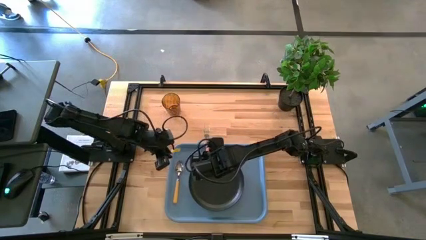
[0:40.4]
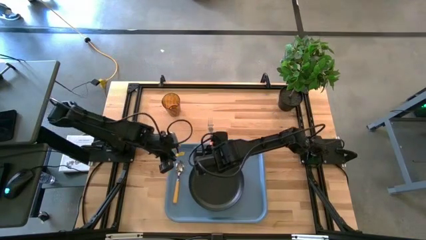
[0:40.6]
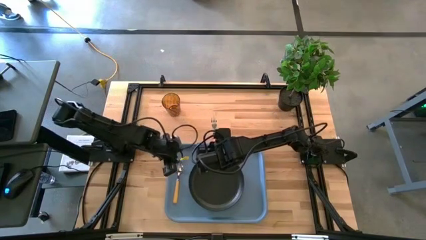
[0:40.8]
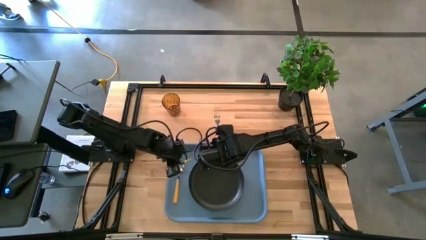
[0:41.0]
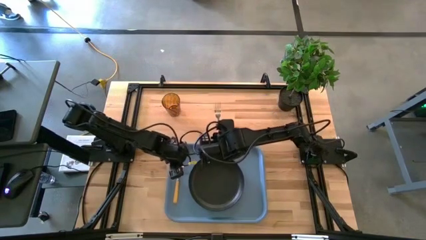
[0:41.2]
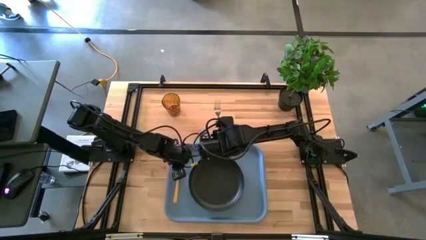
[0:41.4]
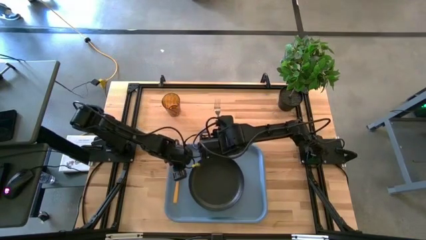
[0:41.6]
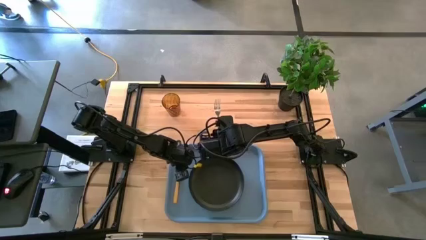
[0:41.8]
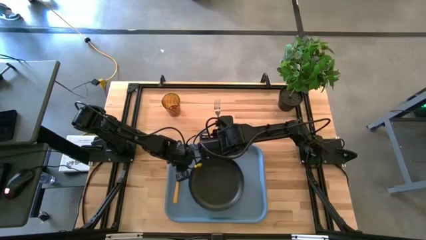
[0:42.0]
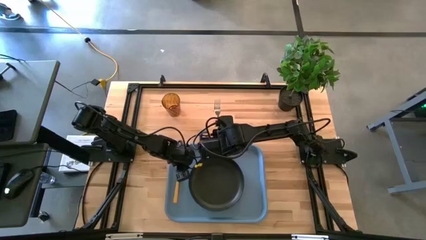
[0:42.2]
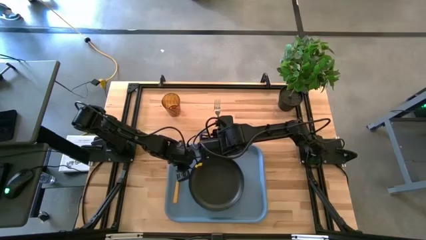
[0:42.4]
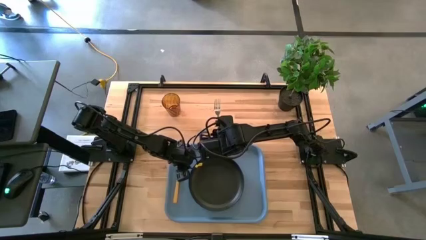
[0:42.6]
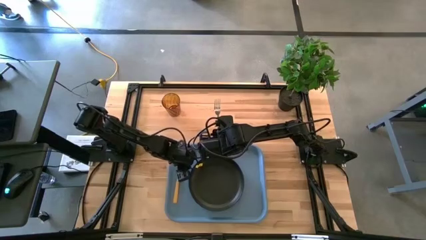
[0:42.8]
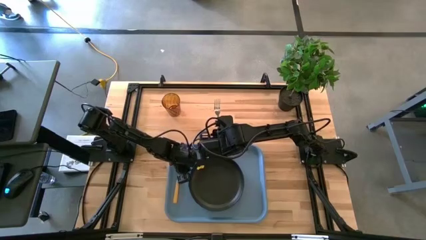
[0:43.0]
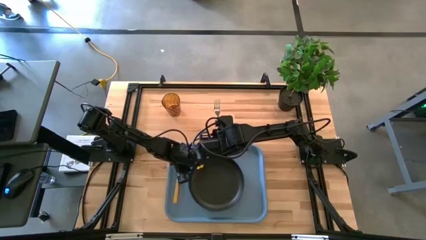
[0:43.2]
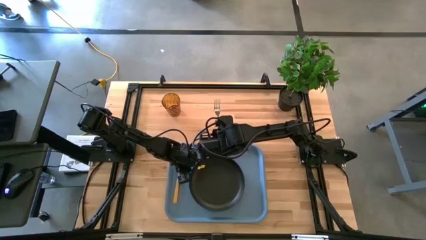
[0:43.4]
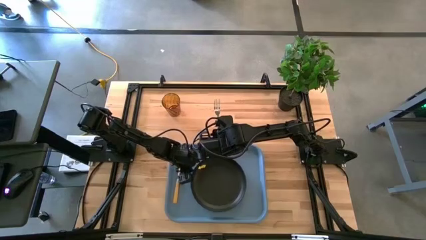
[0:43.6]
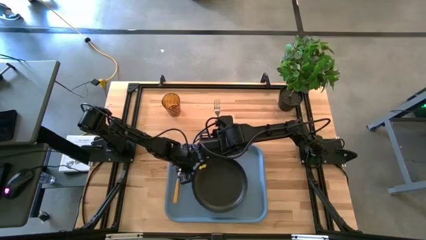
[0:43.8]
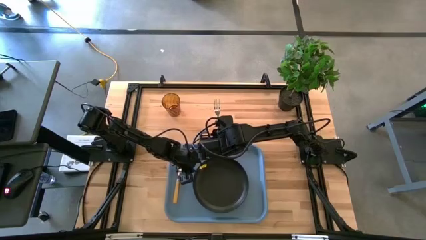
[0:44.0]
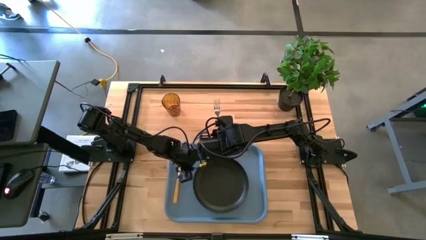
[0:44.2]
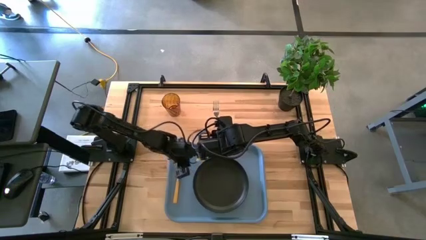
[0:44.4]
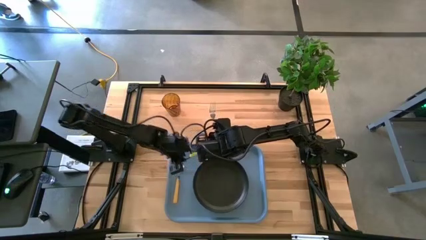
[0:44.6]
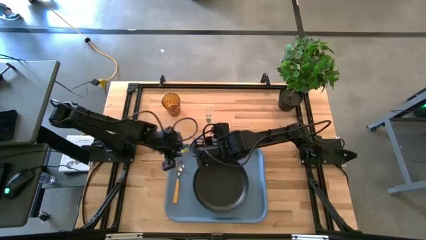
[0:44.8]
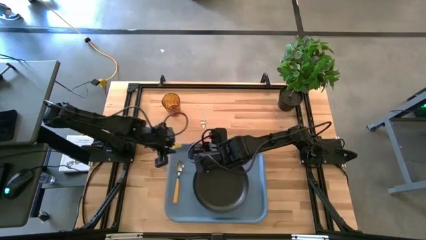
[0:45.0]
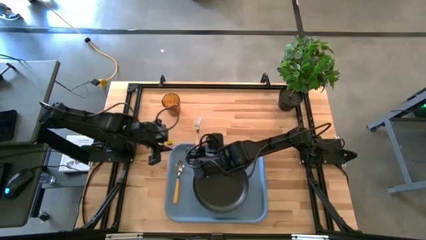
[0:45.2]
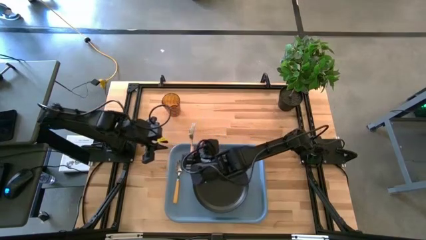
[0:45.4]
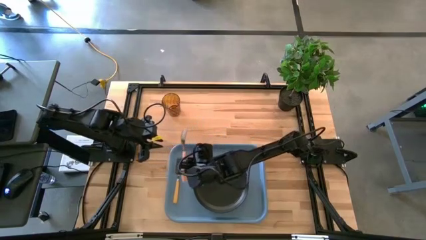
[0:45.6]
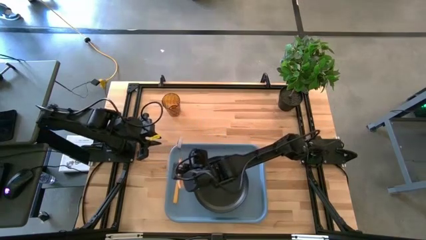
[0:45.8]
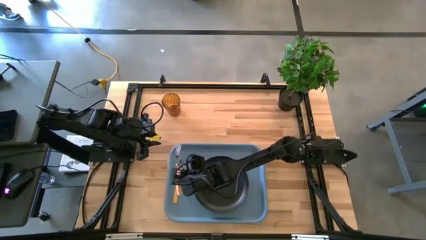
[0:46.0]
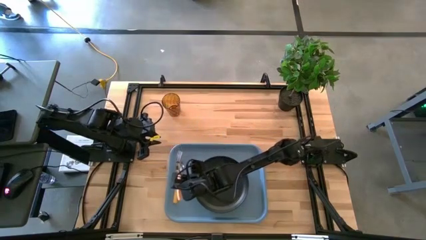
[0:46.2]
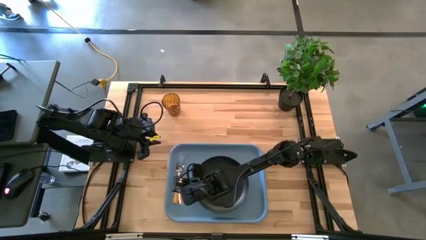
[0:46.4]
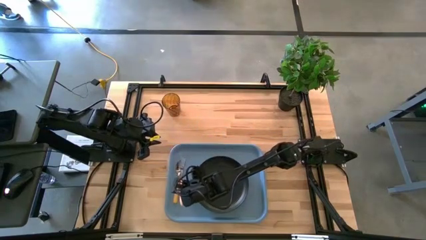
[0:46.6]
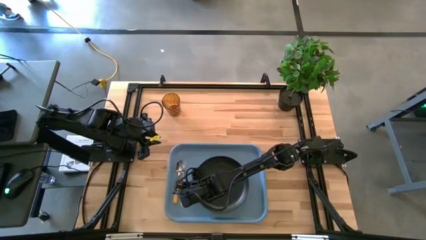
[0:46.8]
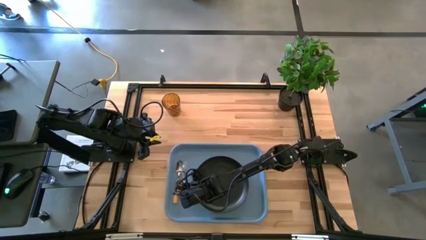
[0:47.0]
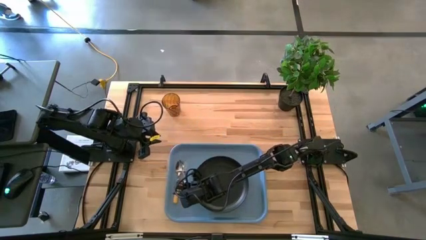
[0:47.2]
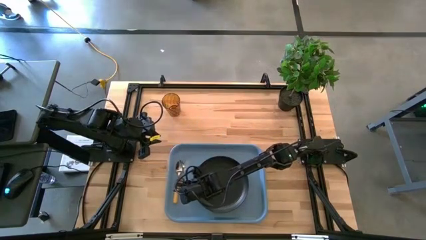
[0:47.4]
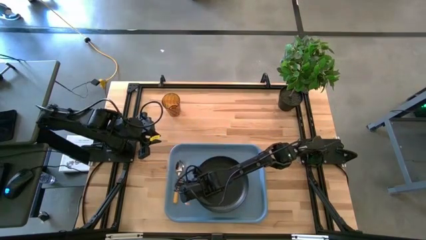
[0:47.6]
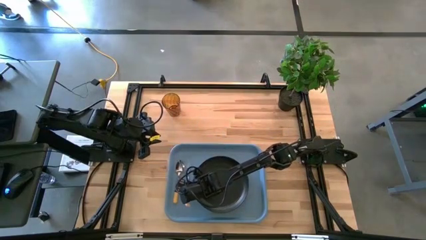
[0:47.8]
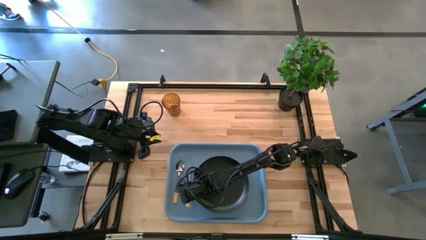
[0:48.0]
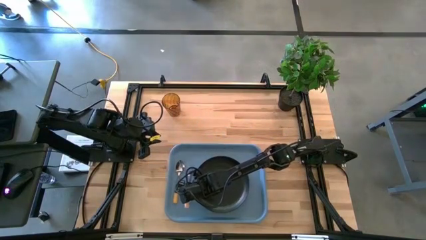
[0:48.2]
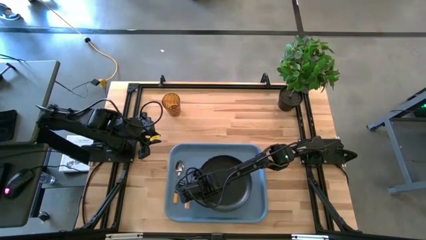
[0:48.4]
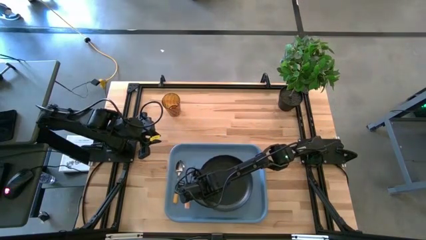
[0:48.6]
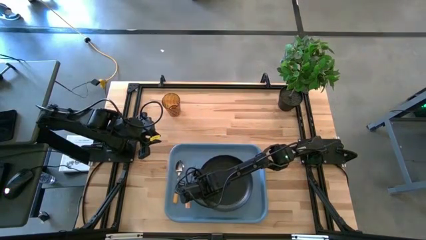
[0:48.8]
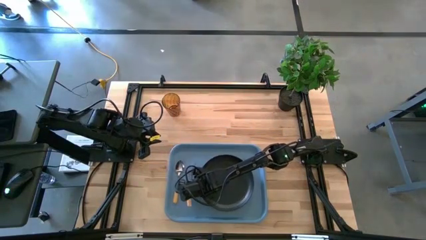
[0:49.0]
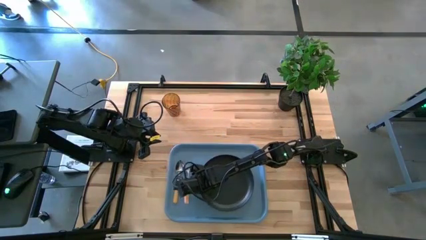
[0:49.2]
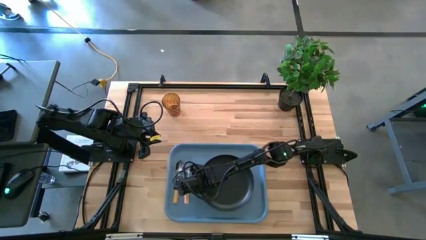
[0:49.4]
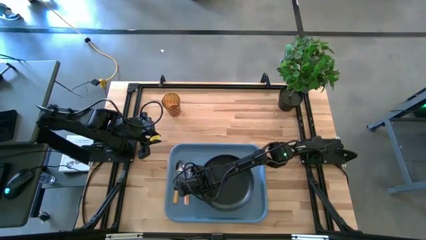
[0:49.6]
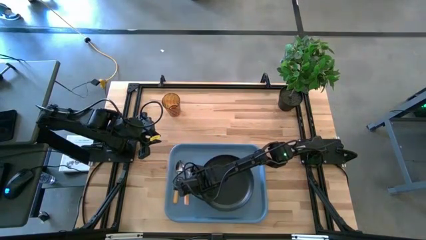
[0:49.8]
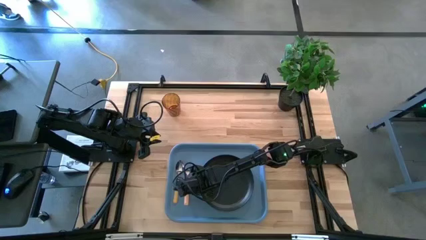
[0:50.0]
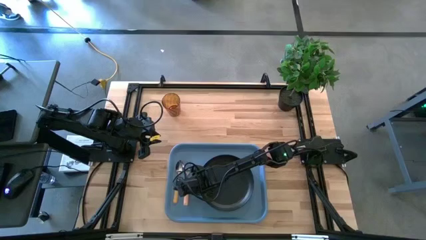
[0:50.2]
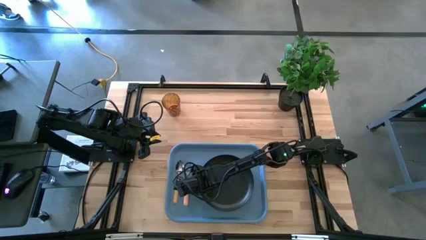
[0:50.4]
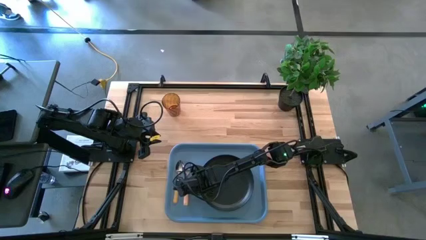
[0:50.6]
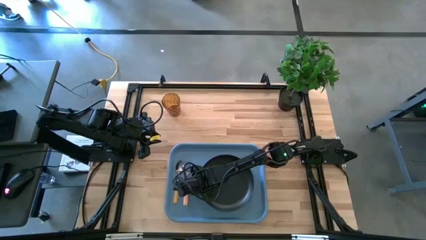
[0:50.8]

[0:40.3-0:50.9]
Task: Pick and place plate/cup/fork/spoon on tray
Put the brown fork on the blue serving tray to the left of the black plate

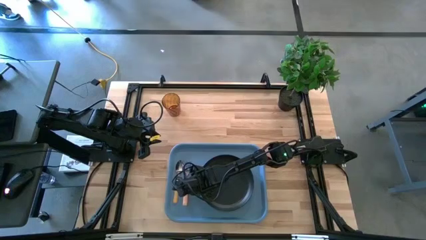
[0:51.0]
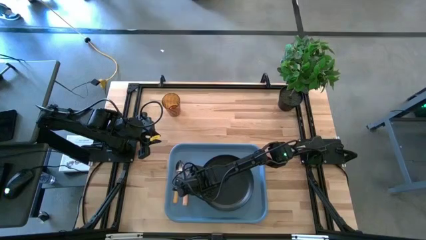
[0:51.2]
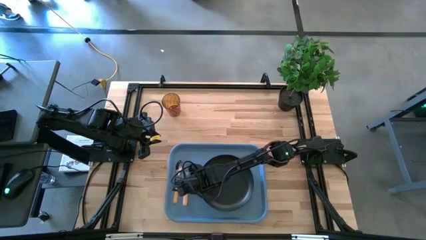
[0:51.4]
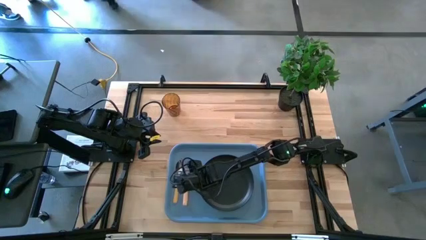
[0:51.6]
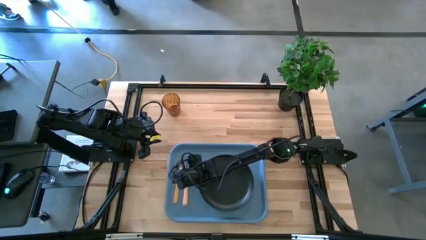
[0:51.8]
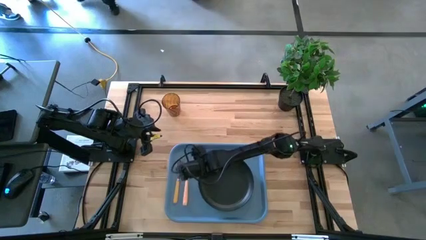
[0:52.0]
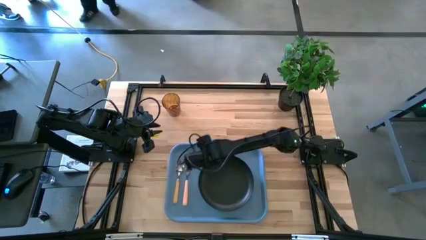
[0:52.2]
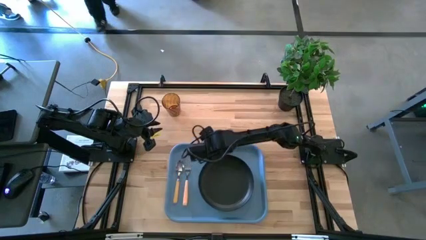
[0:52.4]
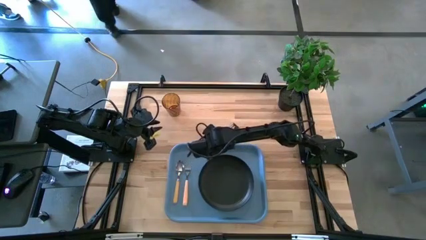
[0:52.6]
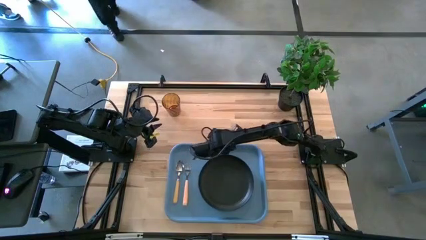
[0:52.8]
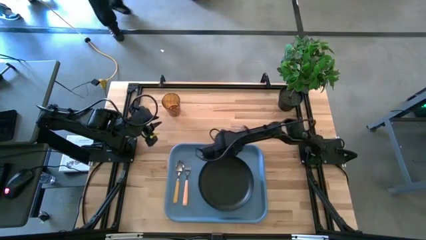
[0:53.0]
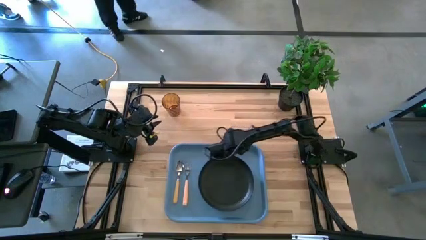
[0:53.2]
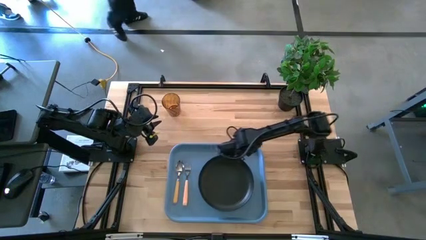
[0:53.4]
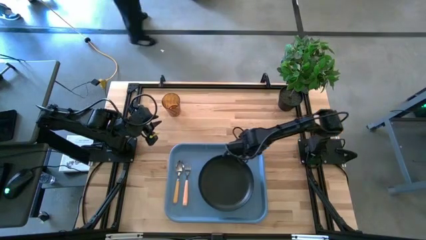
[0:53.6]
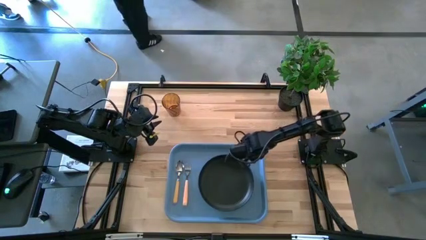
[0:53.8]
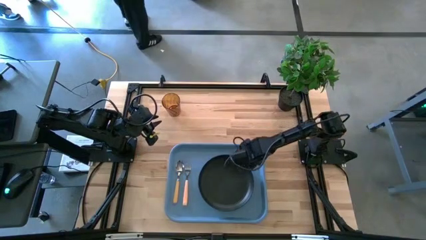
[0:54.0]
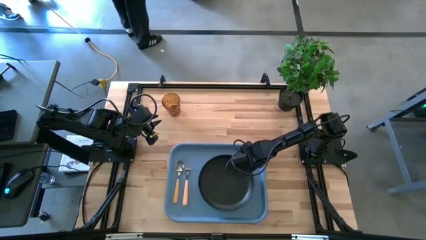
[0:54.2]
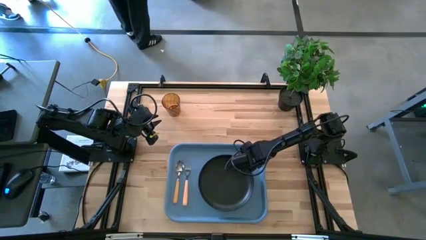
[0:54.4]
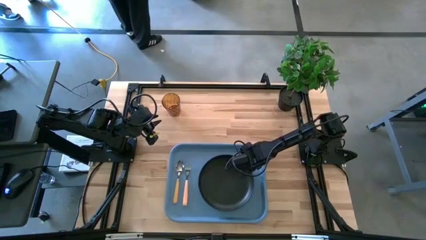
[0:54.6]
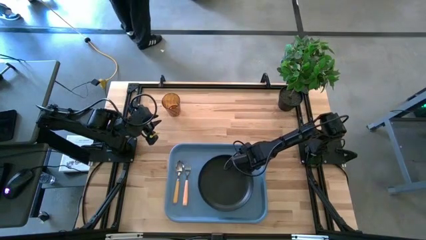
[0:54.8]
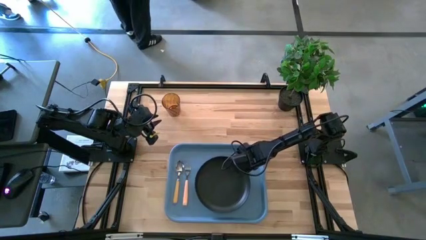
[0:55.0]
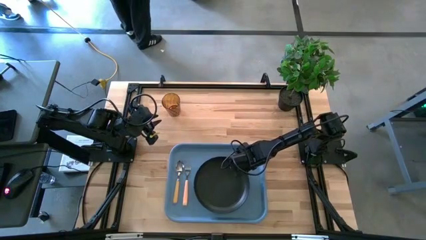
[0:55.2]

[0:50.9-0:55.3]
Adjust the black plate on the blue serving tray

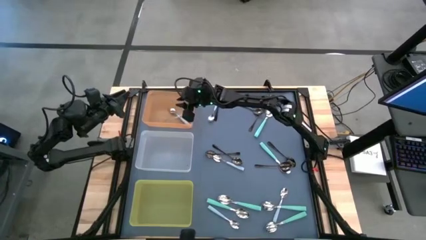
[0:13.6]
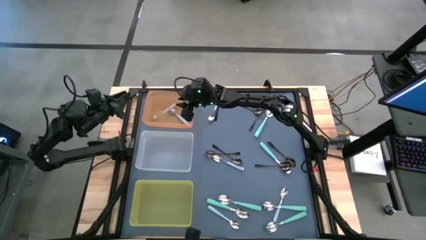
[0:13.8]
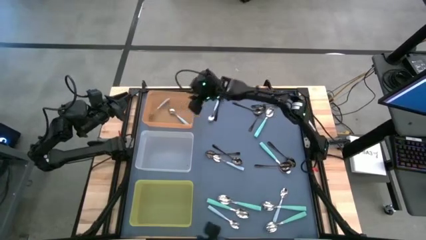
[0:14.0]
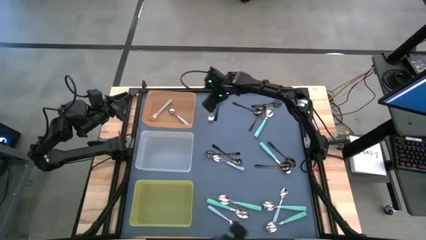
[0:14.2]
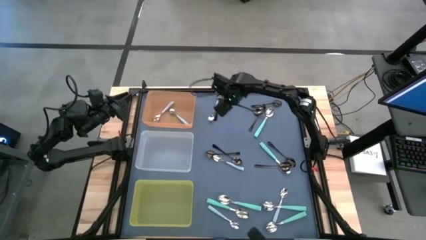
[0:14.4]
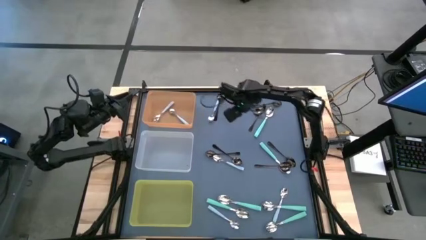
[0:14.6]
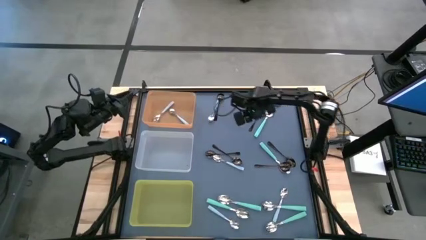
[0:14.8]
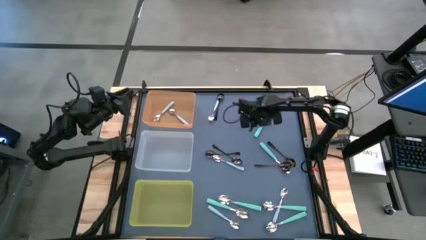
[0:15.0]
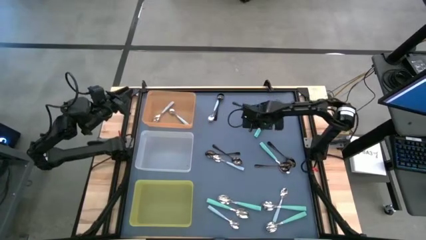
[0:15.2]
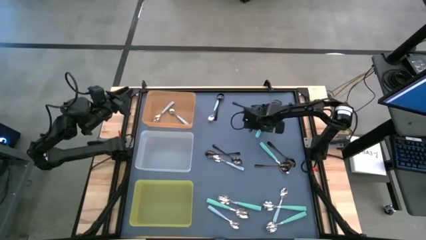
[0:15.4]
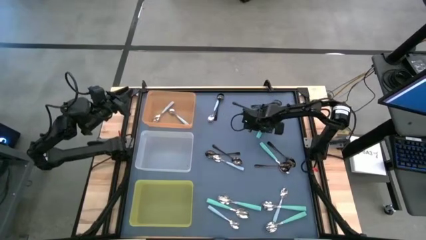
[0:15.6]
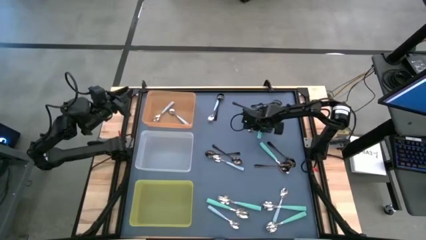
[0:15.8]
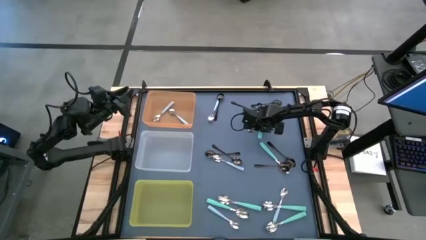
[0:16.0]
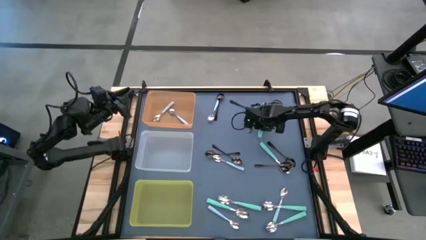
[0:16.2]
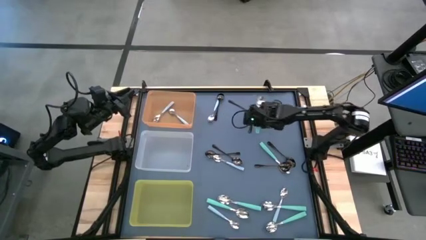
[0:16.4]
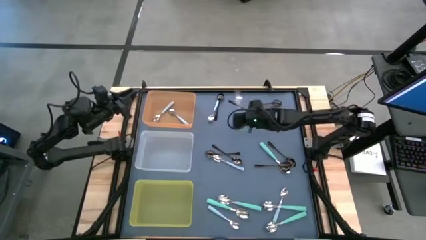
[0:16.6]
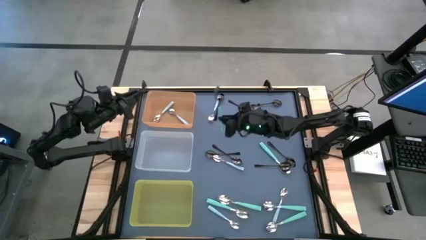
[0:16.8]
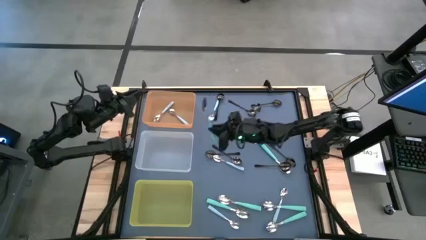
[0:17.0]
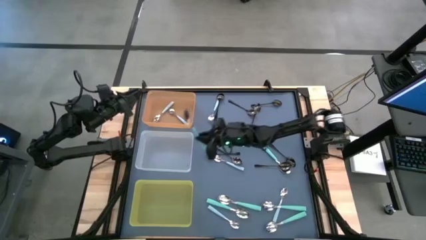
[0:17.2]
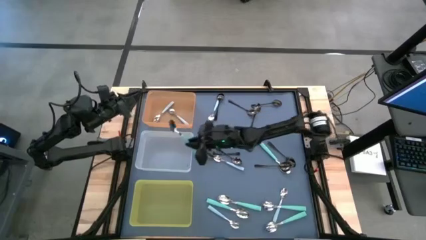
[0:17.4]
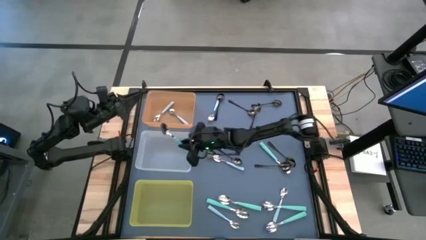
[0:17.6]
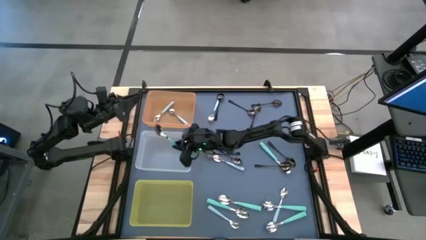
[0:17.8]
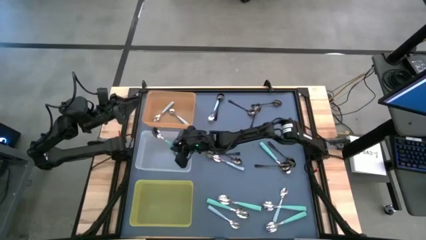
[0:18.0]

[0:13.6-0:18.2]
Task: Sort silverware by color (type)
Put the light green spoon into the transparent bin
